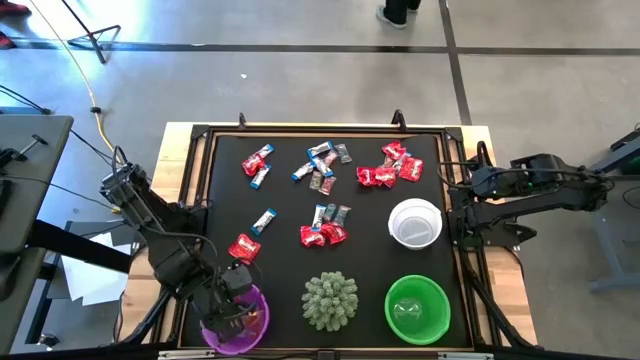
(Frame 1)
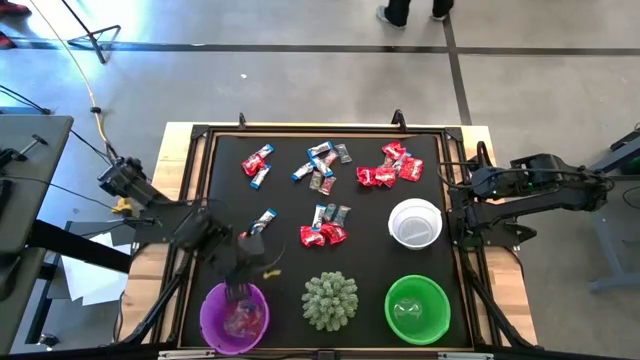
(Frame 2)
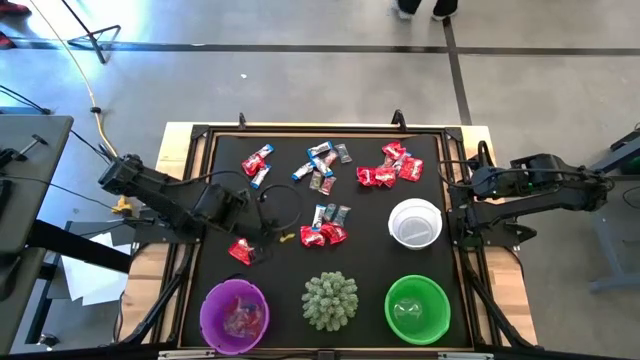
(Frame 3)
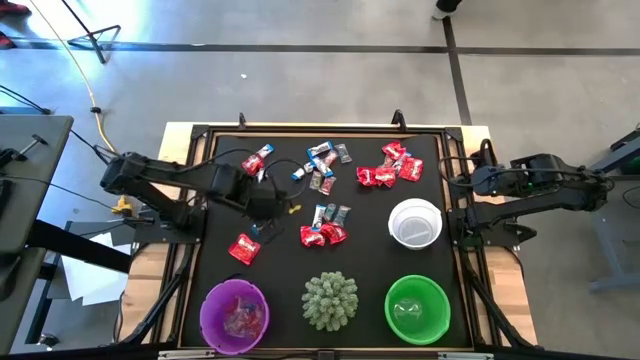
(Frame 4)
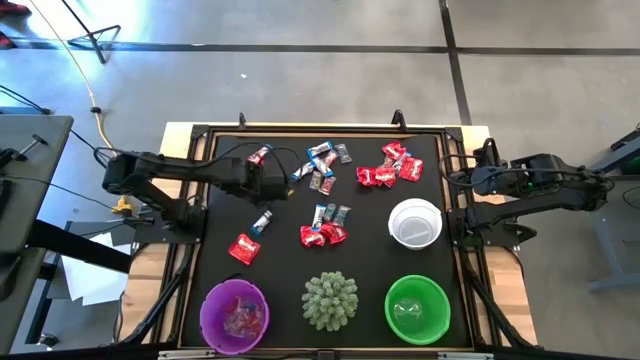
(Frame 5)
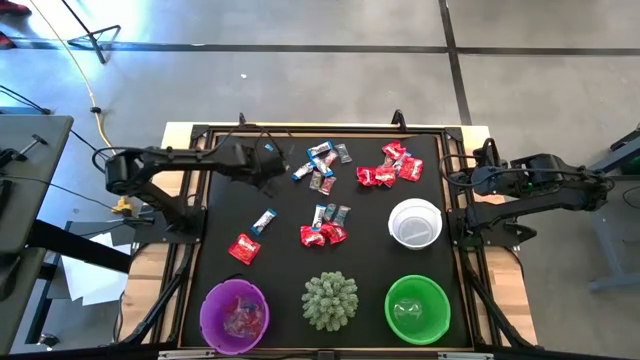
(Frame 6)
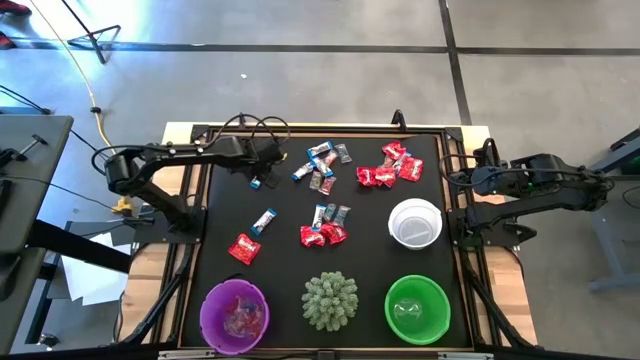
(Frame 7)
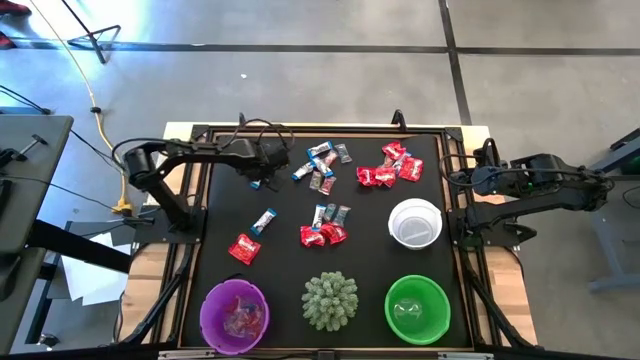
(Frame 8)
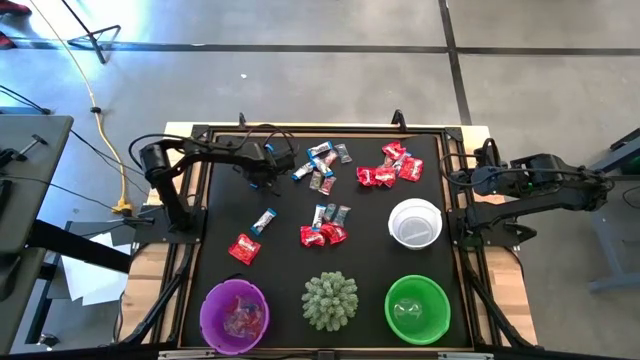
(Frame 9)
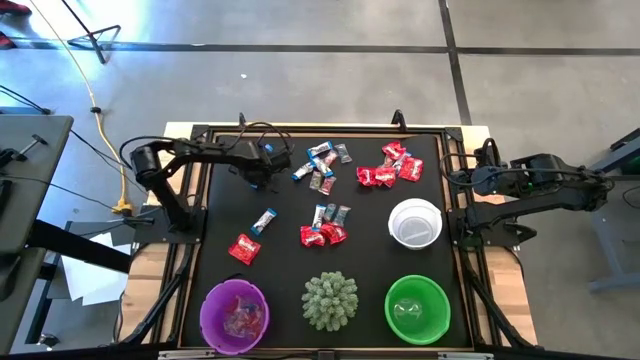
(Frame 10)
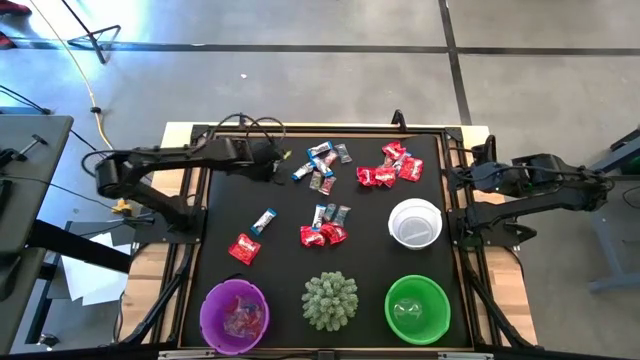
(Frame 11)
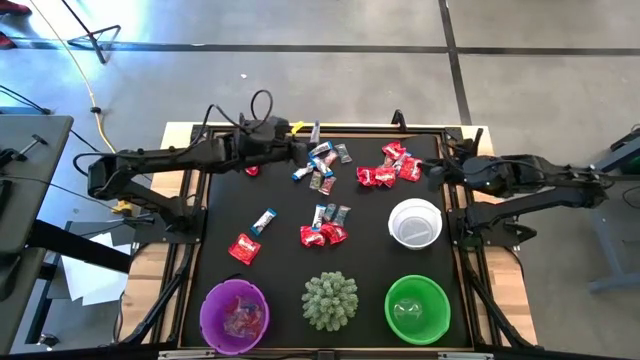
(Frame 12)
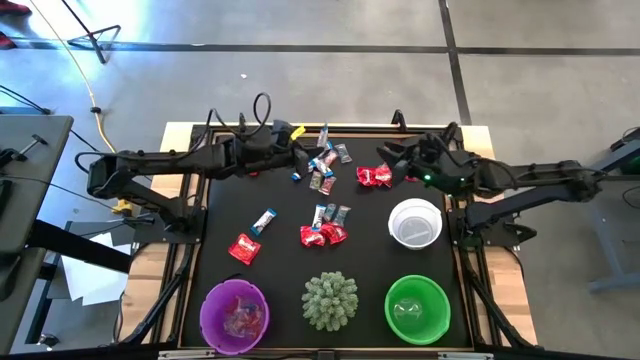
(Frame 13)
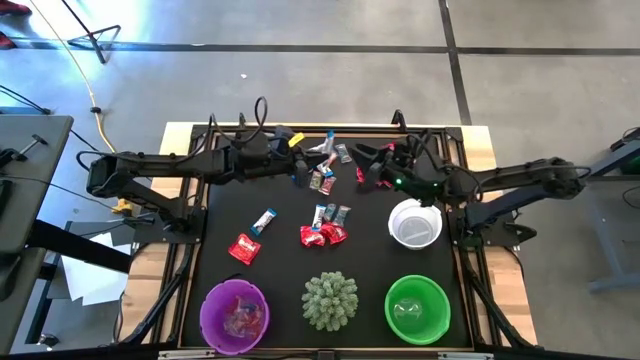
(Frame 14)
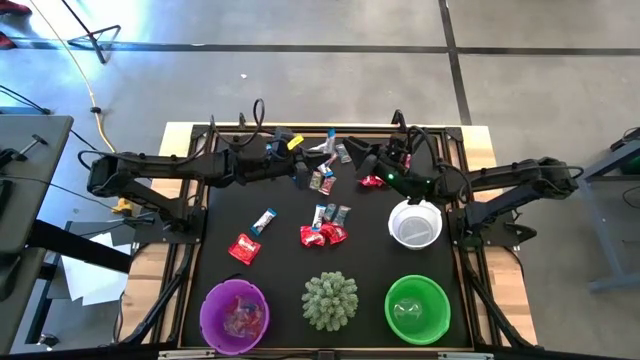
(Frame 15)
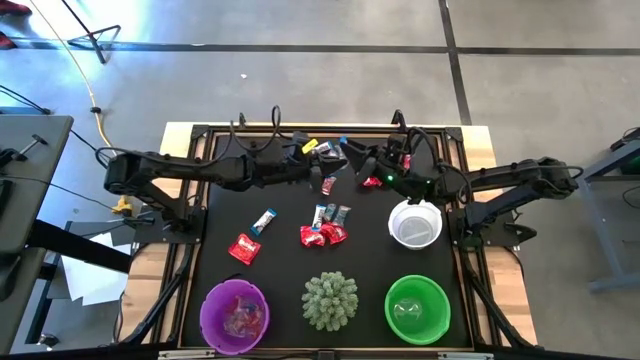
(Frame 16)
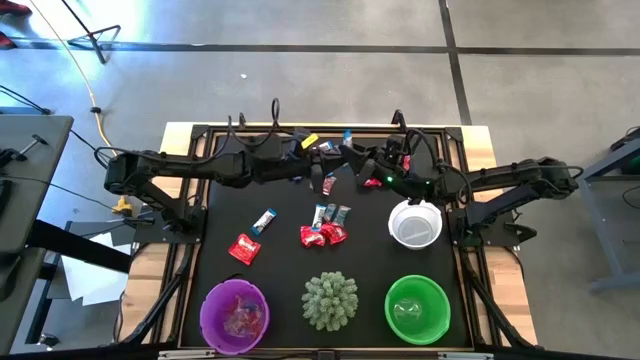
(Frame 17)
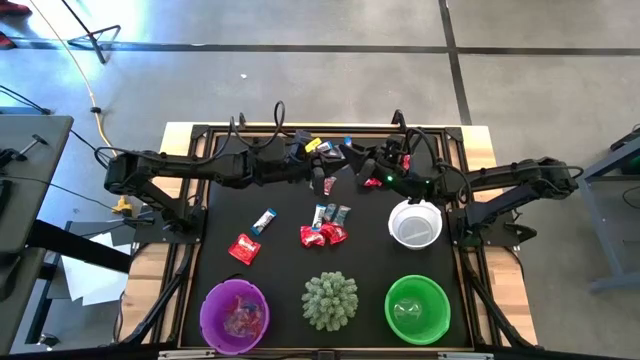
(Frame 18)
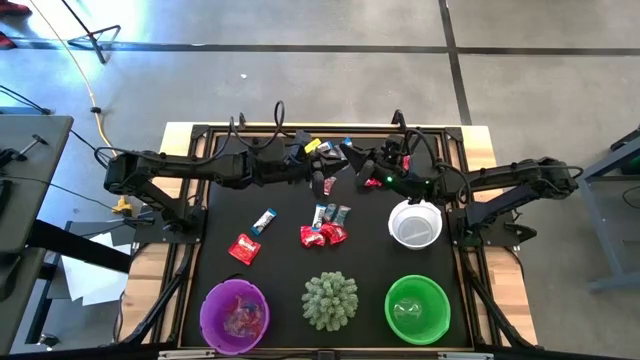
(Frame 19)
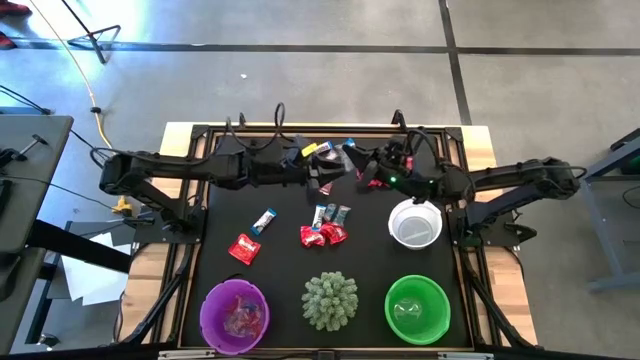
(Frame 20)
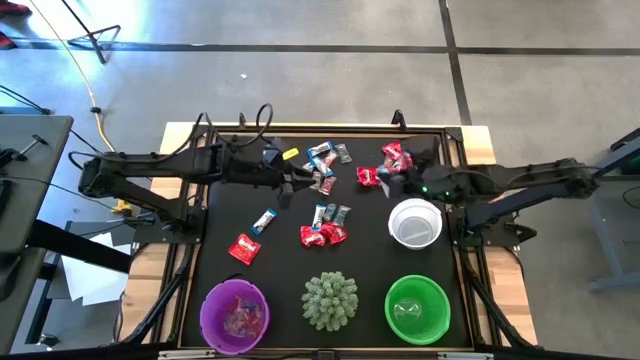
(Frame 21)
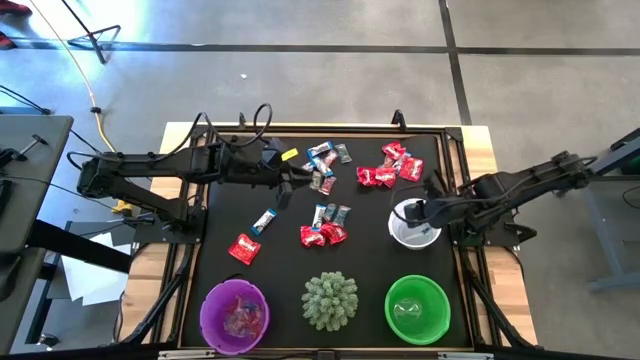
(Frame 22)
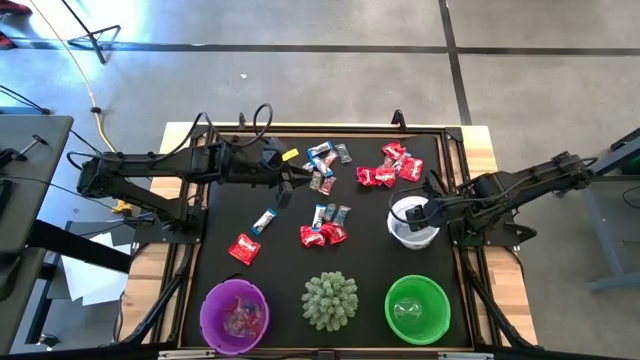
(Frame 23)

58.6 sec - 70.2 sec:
Task: Sort candy
Put the white candy wrapper into the white bucket

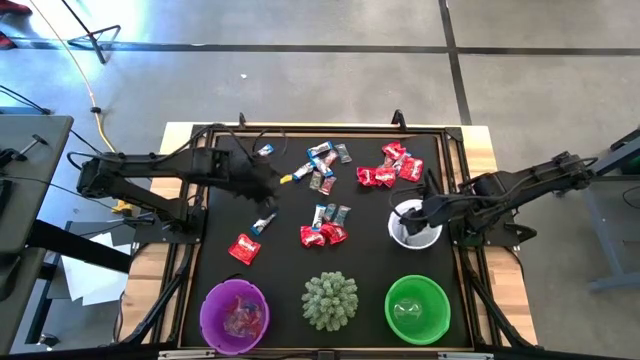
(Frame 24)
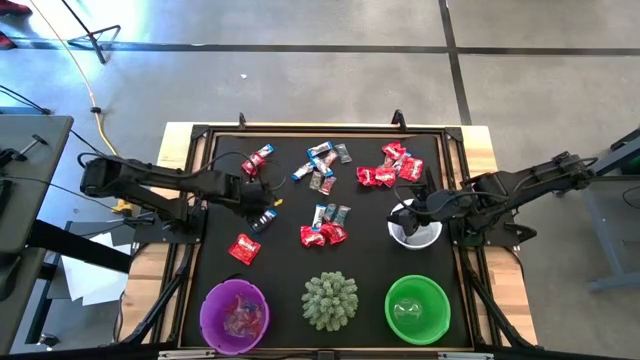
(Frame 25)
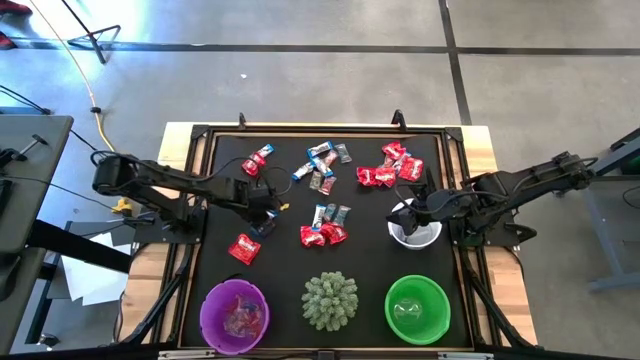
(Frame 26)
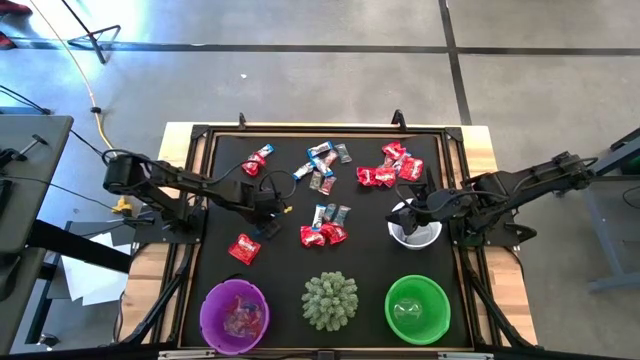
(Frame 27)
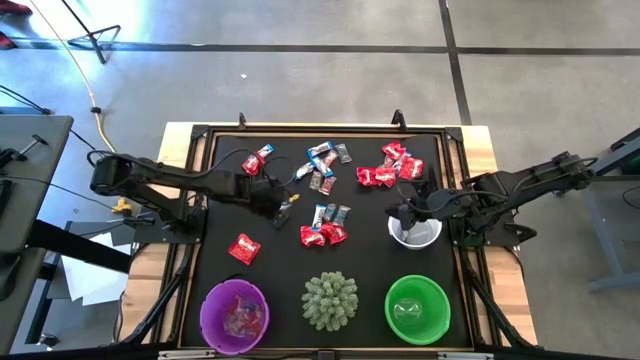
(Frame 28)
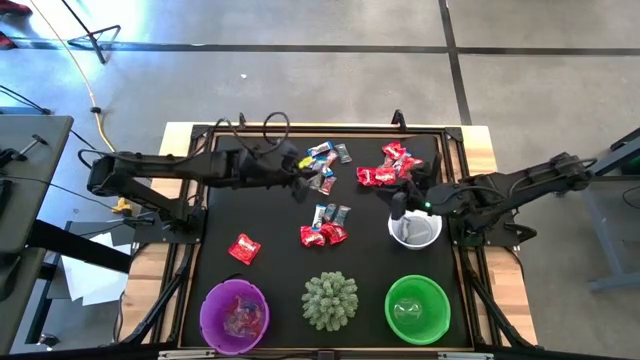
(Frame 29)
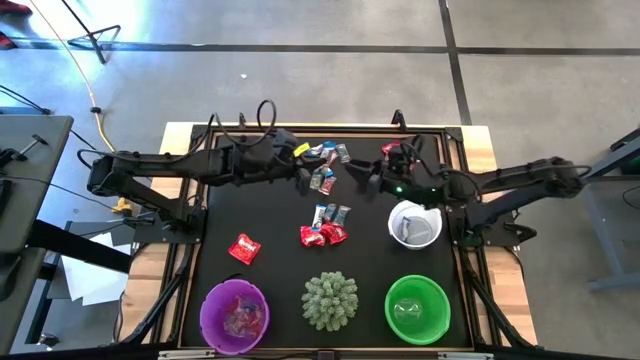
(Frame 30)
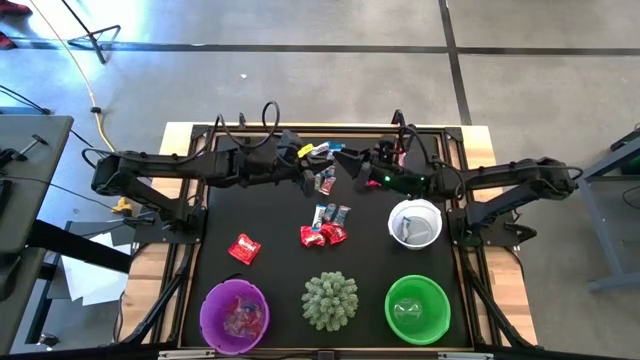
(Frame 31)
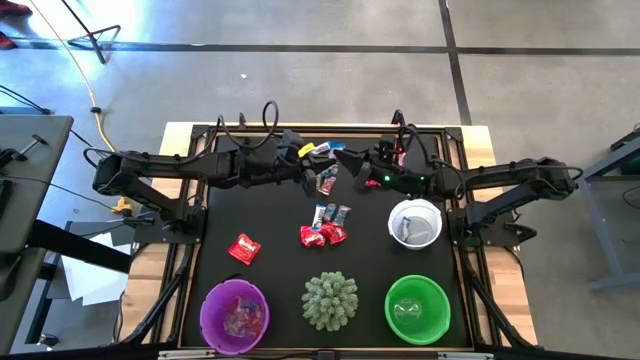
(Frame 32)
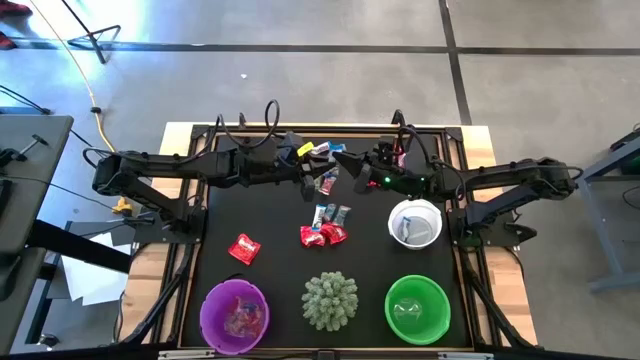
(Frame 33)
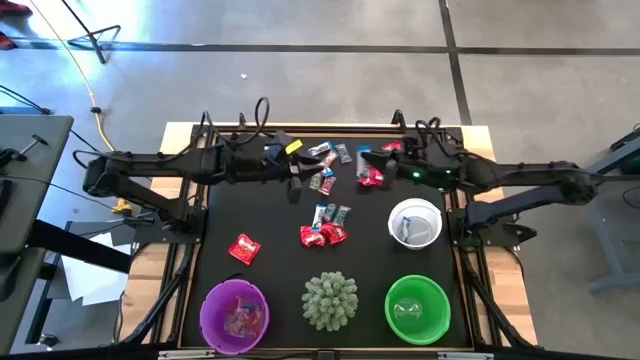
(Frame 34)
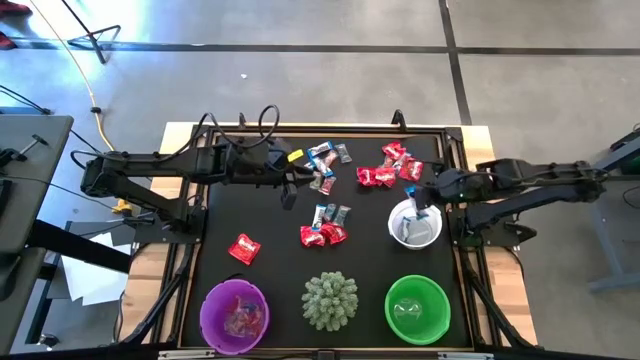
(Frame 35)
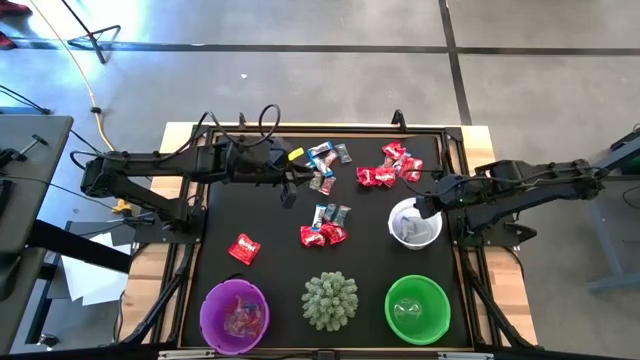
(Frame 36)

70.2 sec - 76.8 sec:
Put the white candy wrapper into the white bucket
